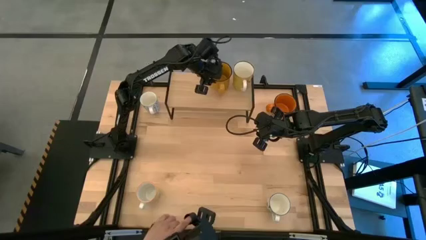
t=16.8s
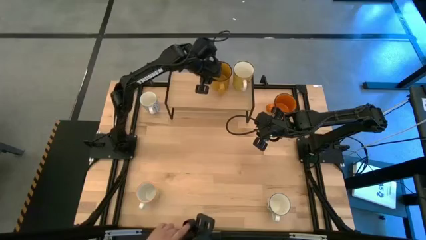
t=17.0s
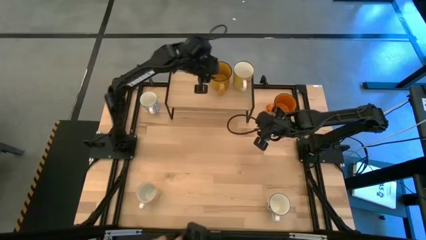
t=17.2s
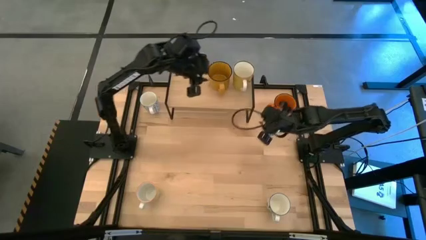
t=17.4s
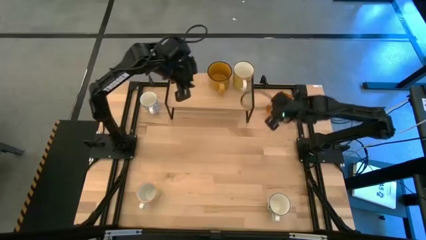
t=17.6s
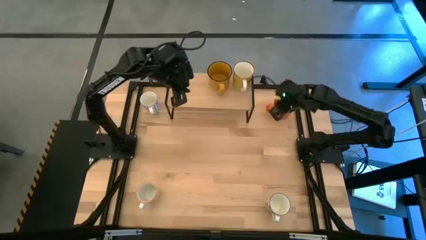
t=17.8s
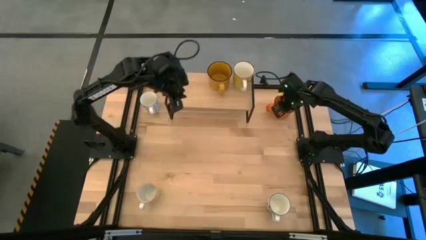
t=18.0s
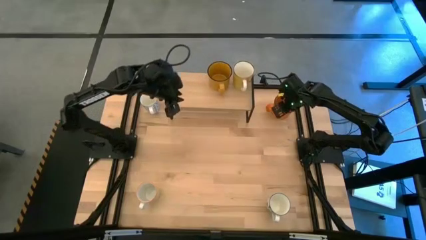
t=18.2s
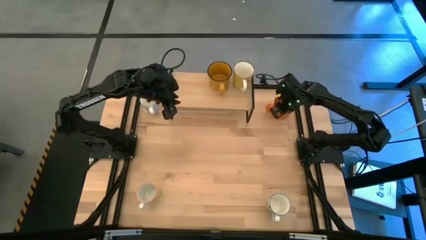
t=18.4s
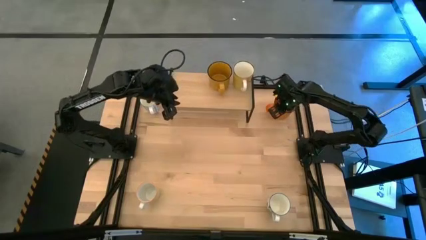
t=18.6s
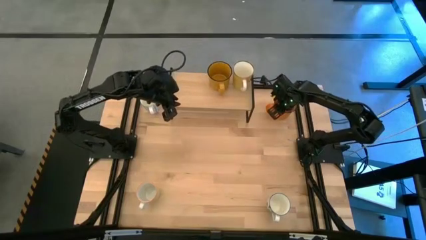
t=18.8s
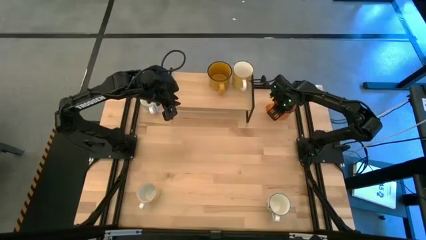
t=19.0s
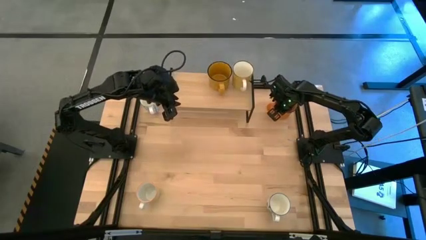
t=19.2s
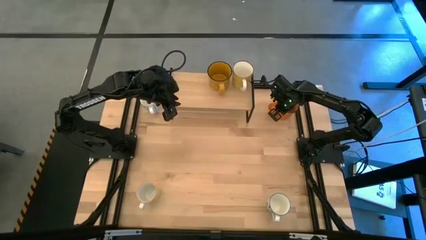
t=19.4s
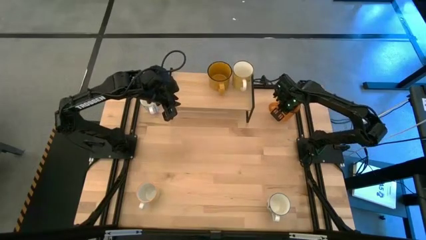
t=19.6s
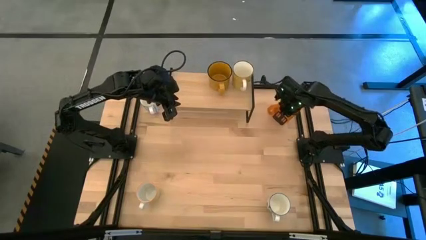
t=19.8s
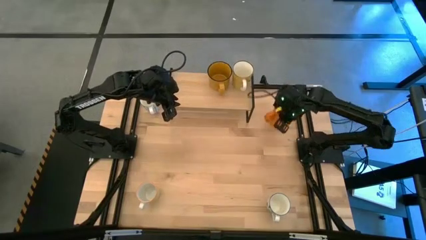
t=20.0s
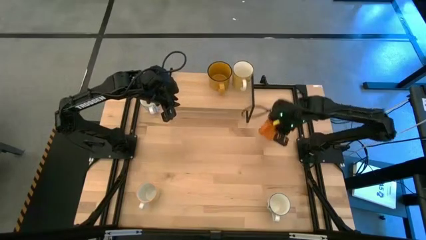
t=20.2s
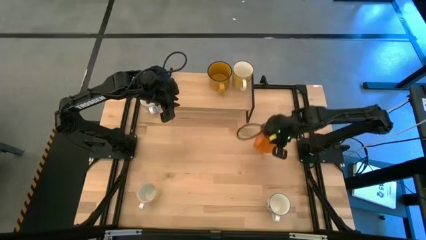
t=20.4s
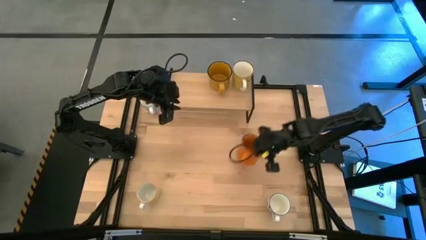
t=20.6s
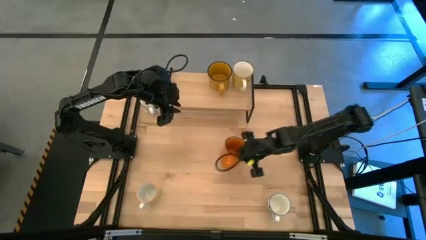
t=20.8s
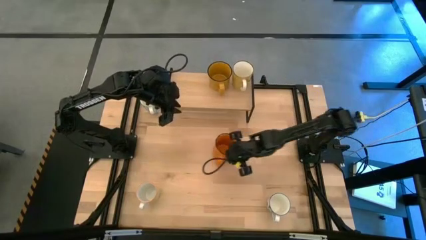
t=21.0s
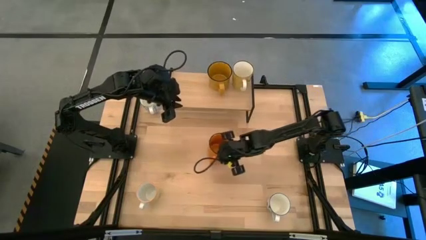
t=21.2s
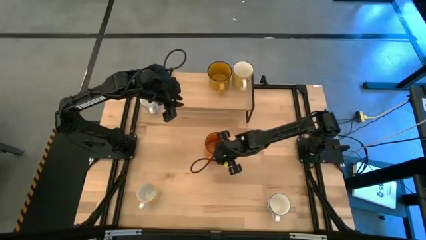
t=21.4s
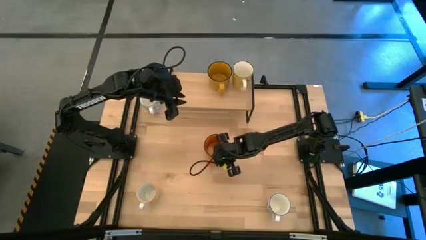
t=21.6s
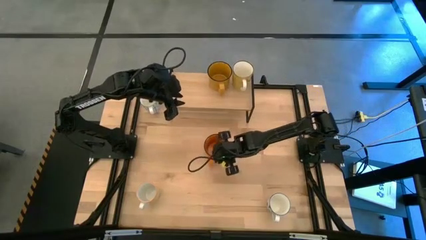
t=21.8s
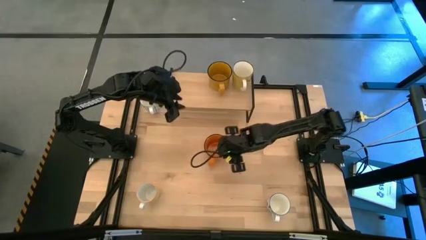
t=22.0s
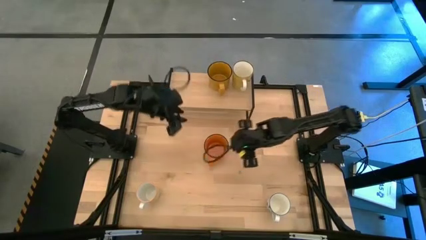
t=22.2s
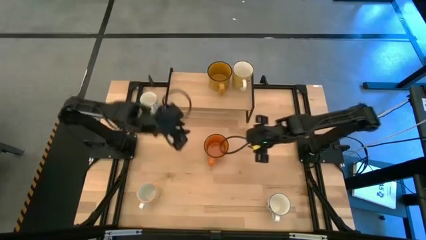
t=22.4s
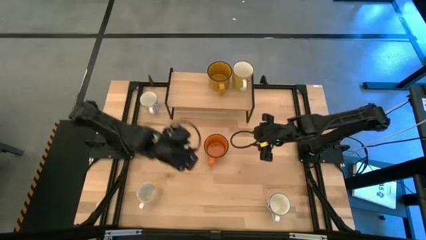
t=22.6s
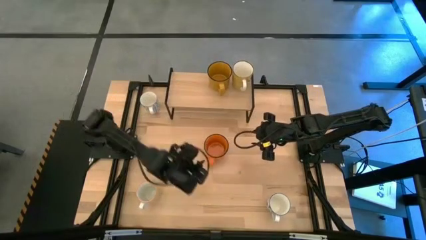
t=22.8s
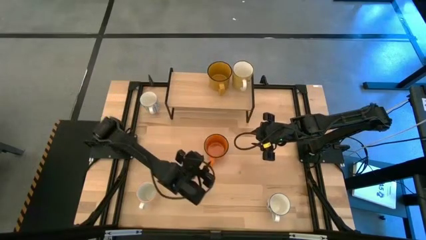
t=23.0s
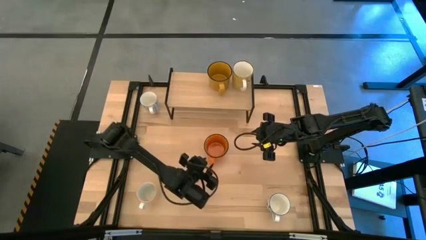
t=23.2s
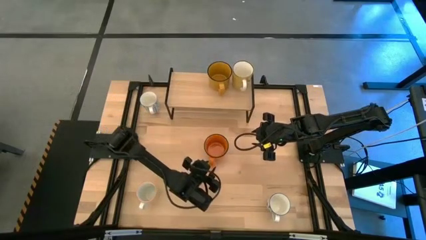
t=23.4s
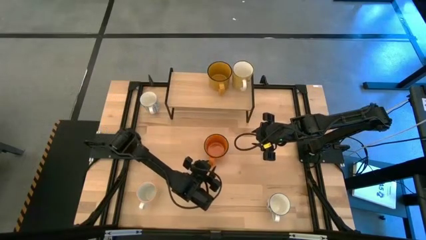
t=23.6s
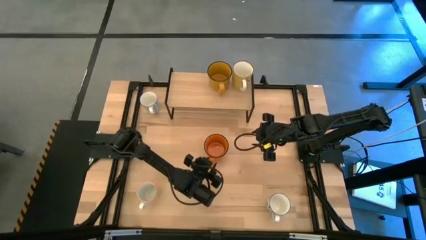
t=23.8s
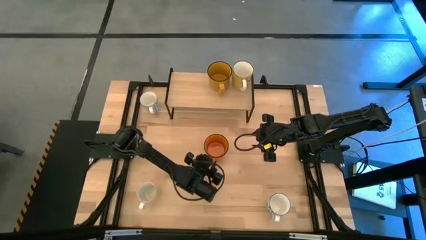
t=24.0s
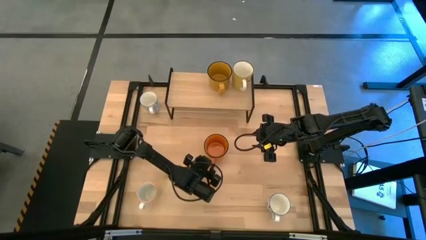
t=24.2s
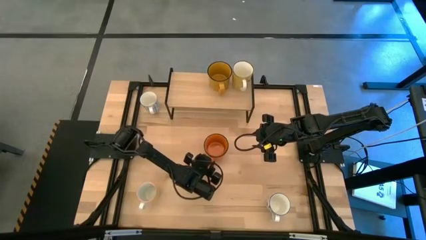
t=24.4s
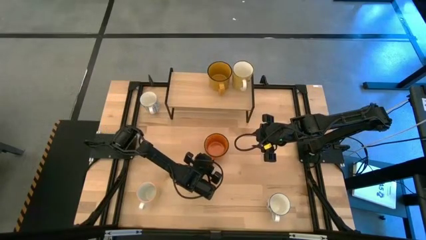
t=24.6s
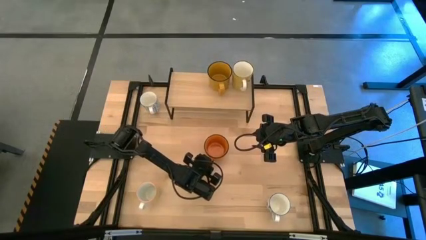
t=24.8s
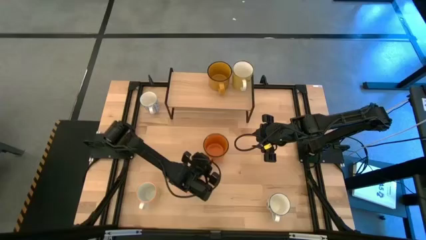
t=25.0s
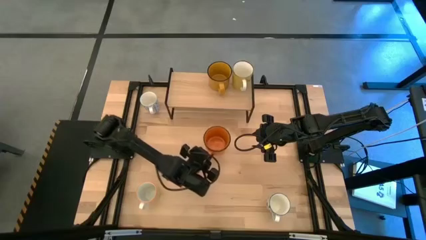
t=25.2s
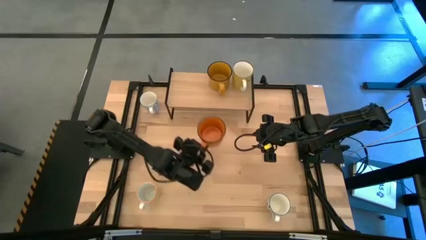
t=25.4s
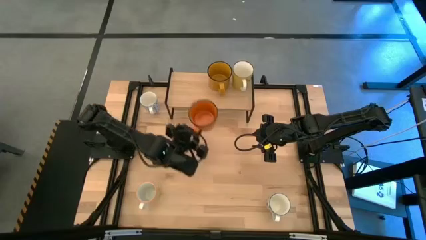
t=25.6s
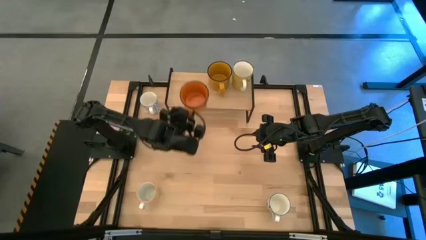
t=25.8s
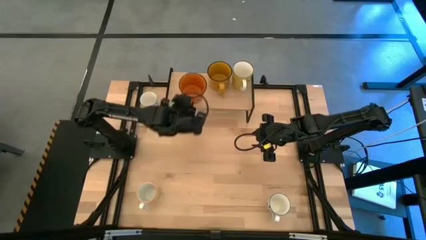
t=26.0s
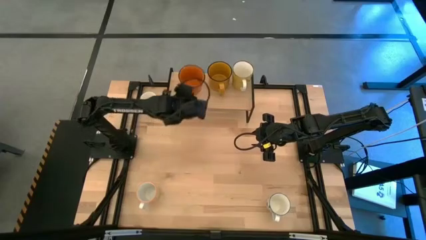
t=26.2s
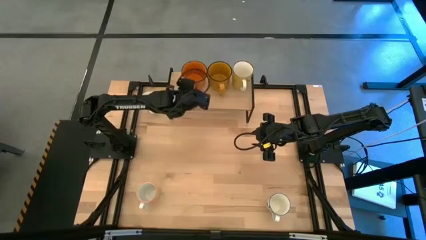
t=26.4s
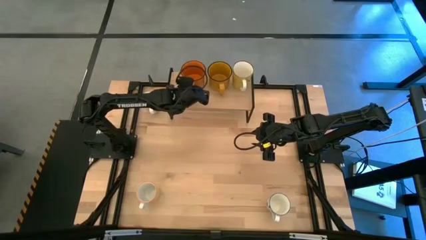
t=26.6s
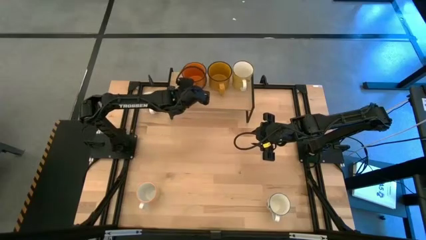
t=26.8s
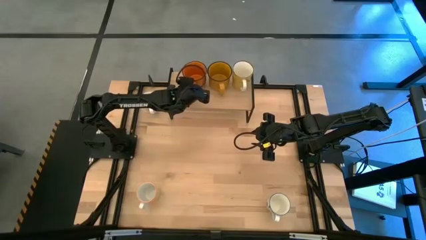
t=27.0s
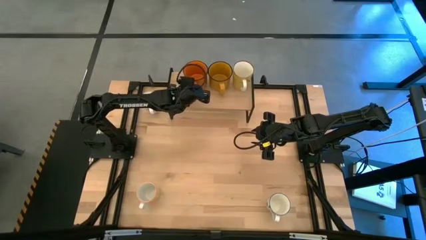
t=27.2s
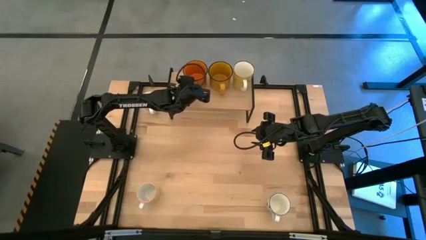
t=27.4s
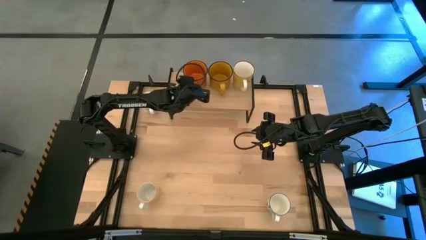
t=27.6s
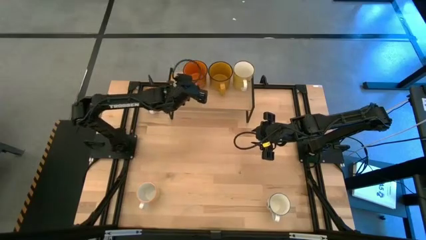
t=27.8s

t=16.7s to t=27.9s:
Task: Place coffee mugs
Put the orange mug on the shelf

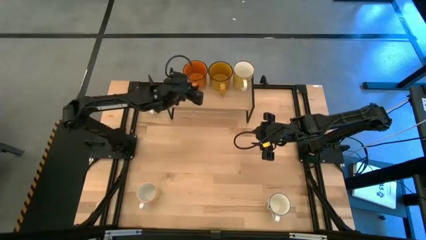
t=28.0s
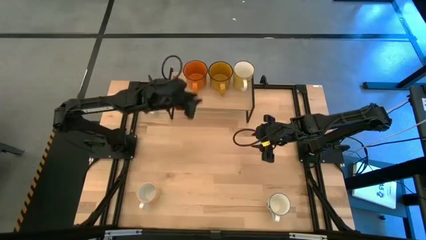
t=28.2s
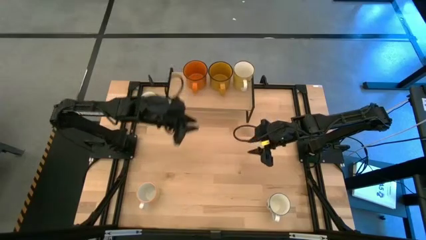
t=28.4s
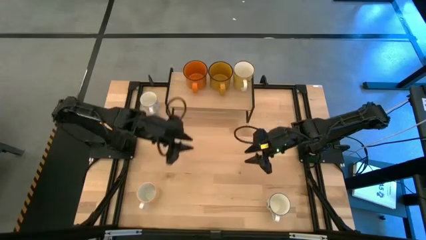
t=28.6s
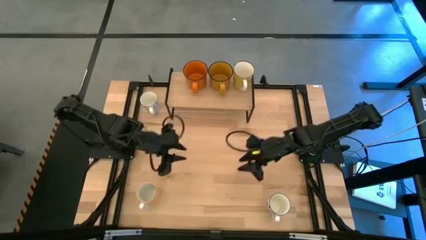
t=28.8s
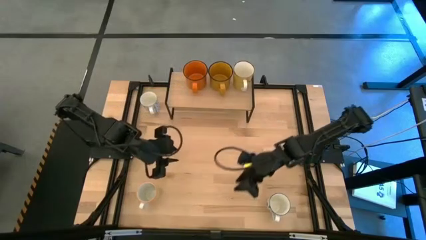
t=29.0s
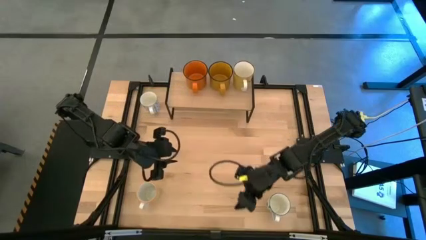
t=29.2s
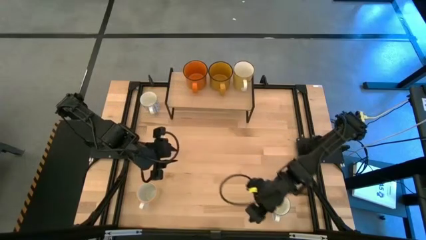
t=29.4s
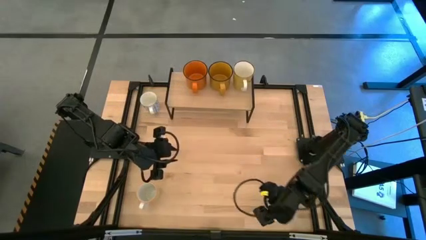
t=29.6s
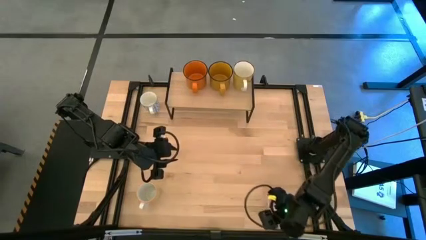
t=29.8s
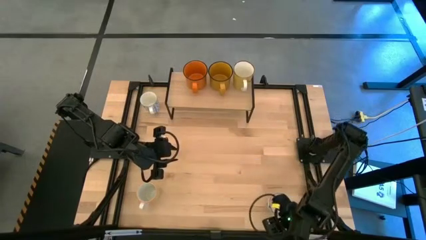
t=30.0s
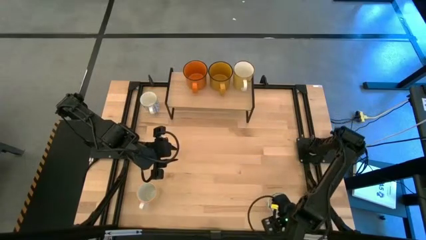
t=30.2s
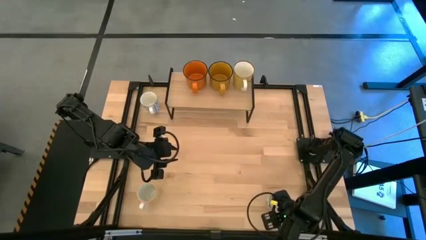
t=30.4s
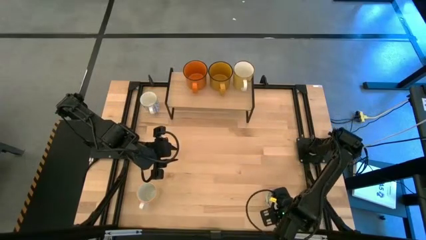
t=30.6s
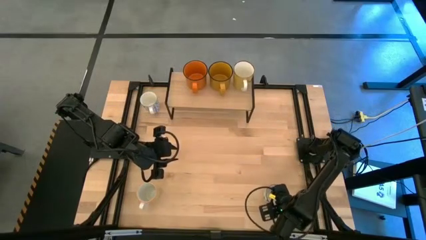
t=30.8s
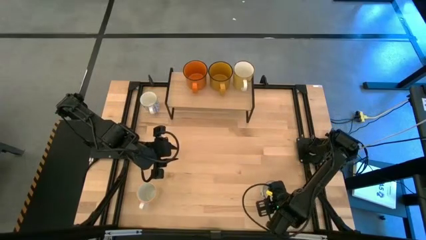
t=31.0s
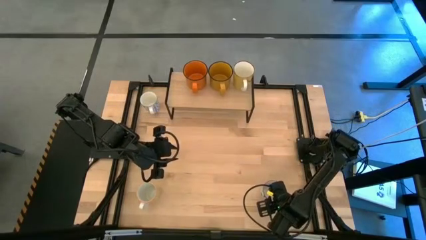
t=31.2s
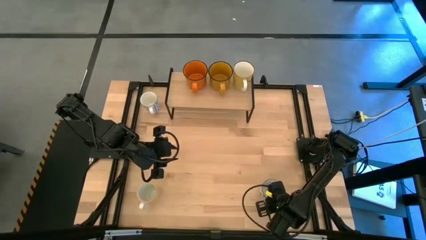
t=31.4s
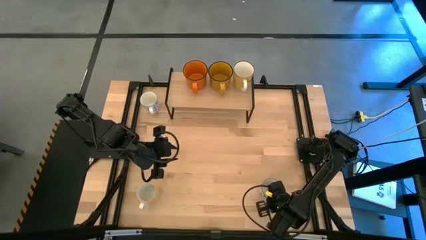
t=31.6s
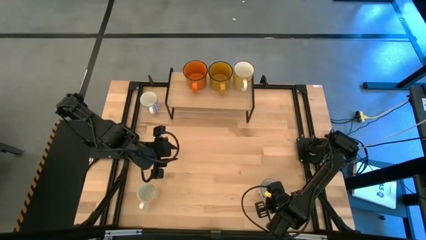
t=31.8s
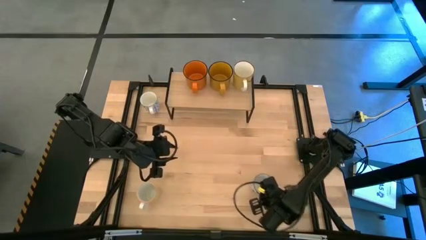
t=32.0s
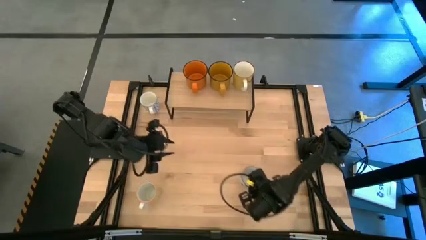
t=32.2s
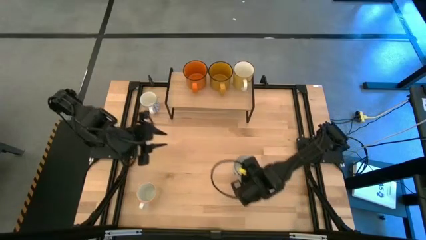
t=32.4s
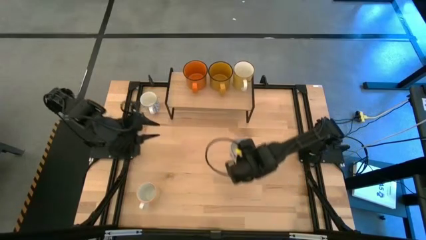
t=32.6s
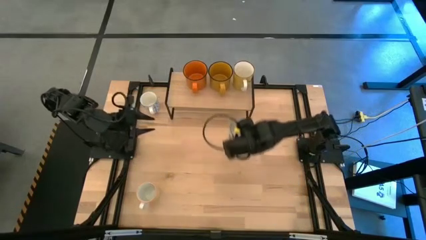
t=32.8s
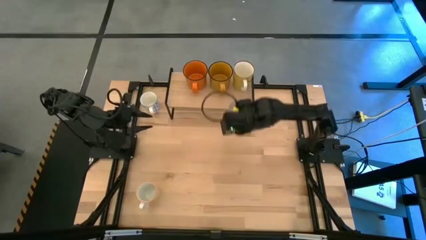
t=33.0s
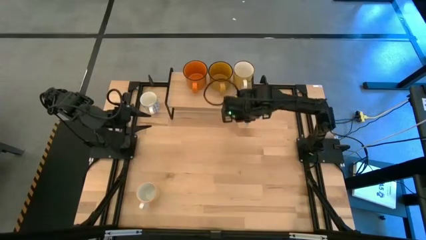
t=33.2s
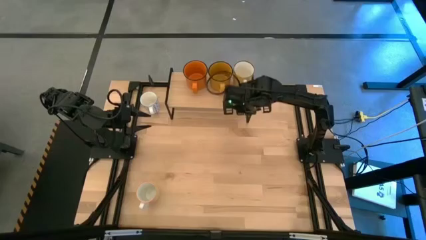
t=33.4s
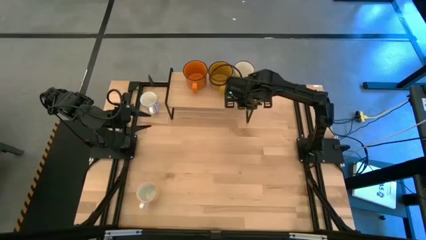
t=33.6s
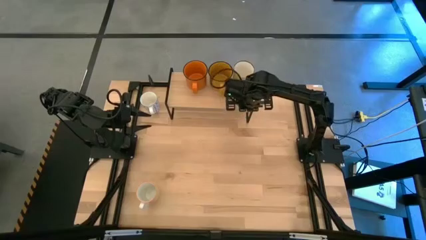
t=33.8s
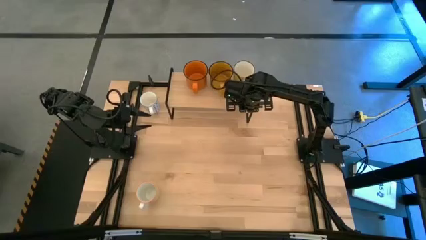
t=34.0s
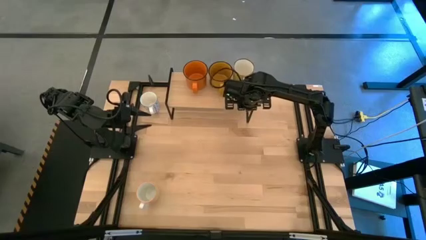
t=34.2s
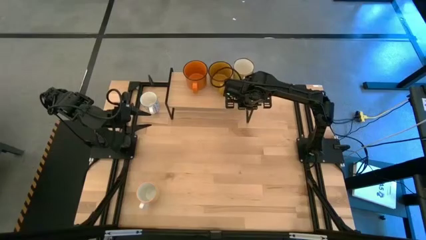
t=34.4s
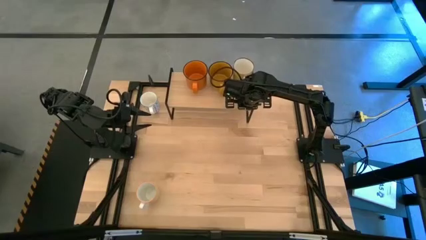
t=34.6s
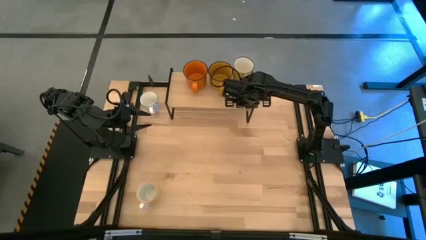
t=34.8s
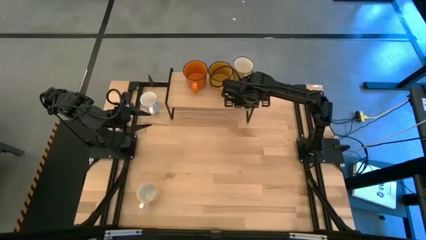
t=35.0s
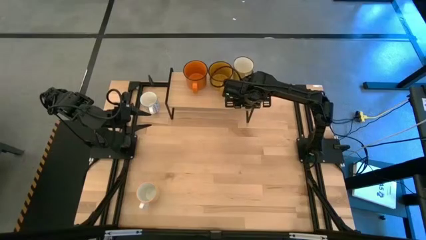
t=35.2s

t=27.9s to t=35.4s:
Put white blue patterned mug on the shelf
